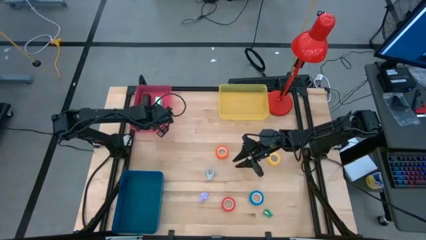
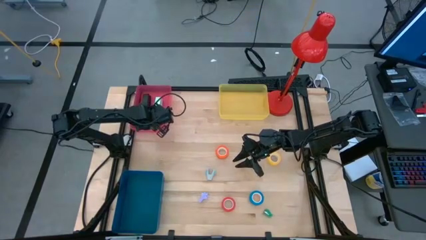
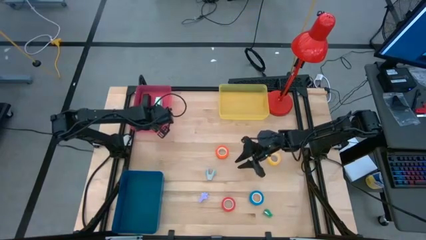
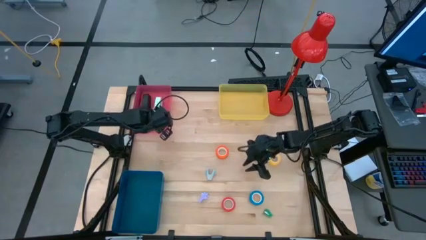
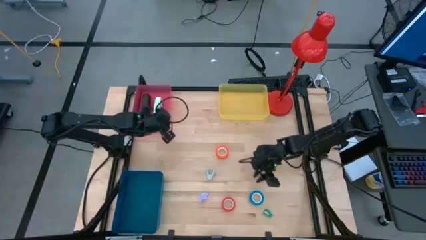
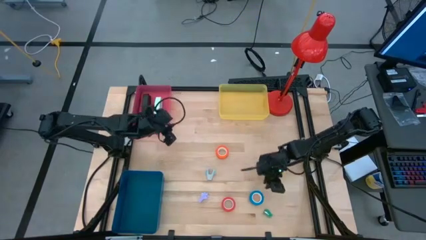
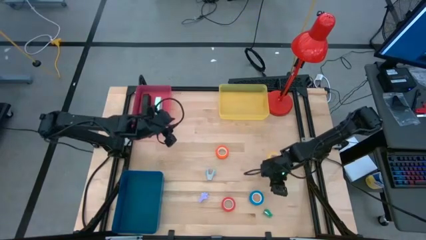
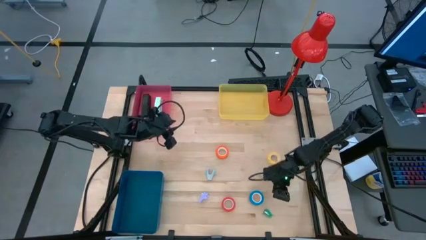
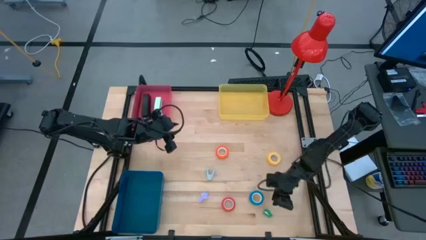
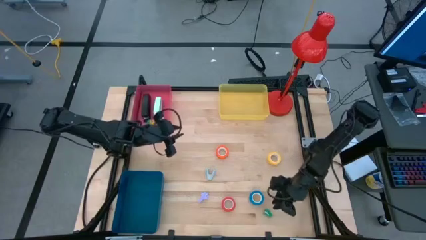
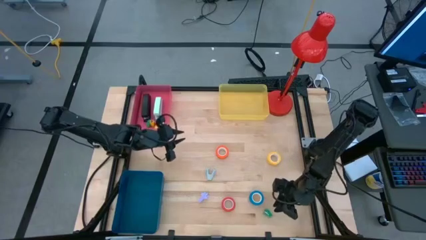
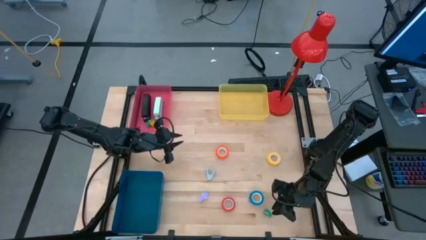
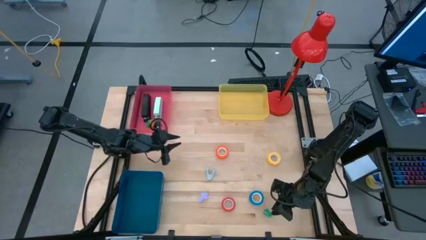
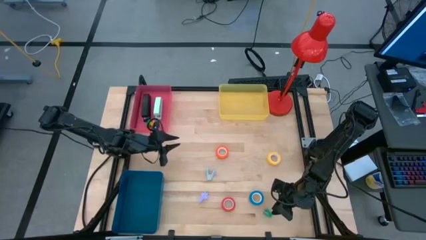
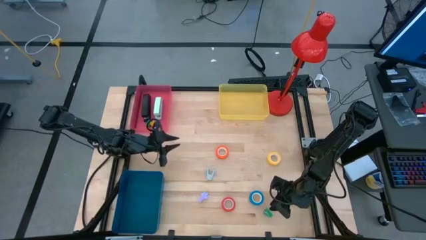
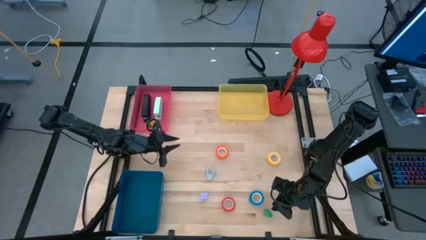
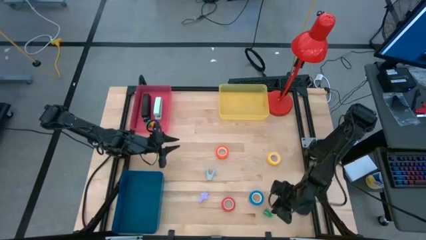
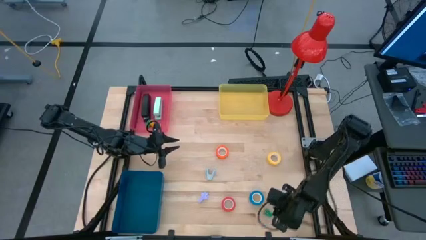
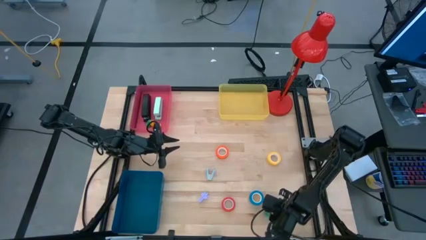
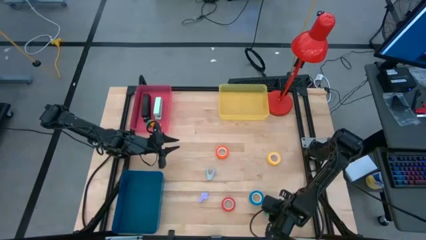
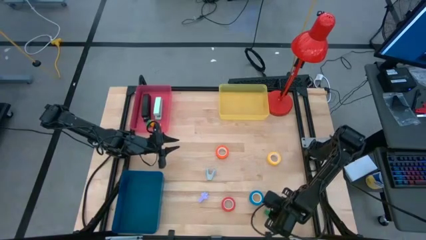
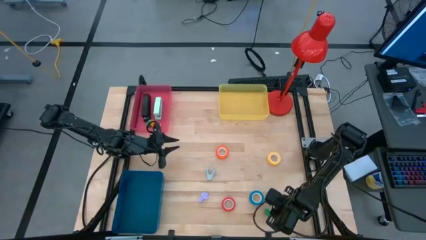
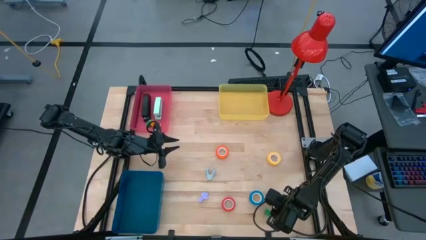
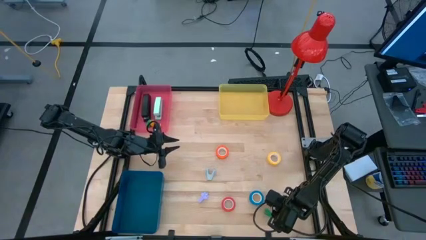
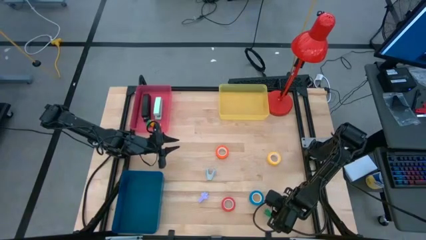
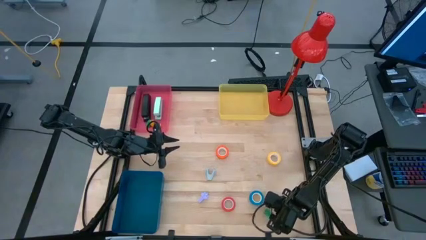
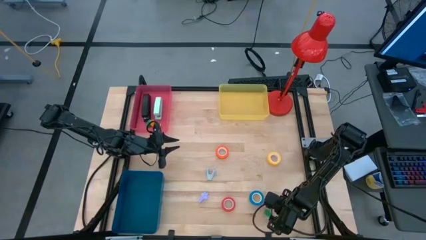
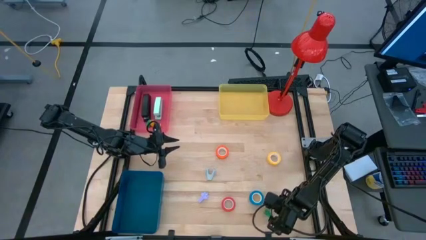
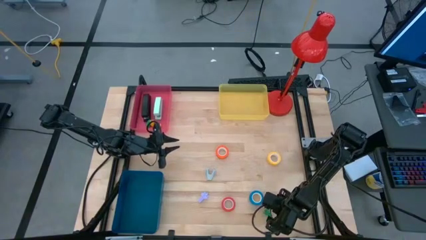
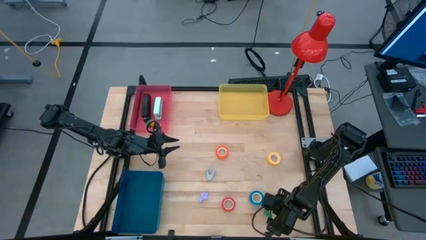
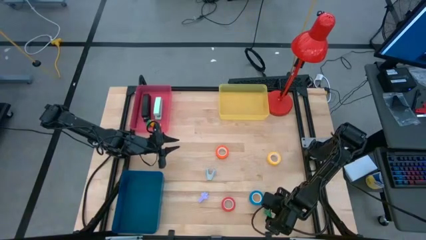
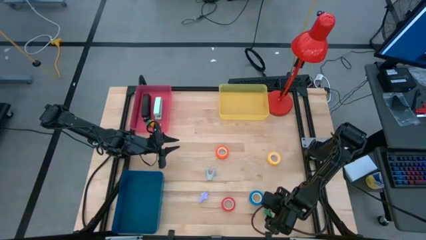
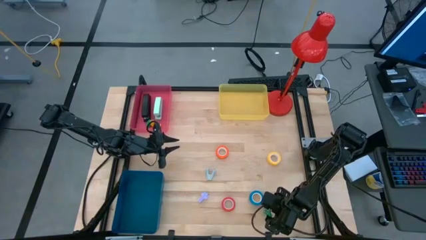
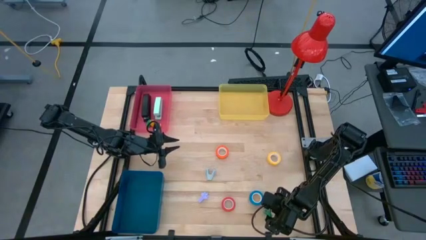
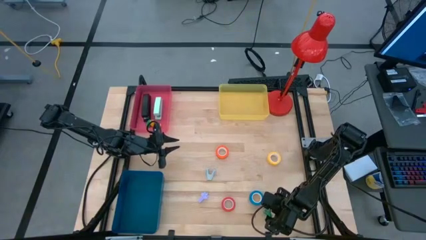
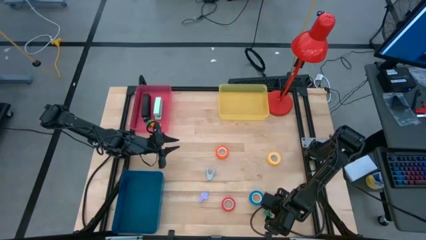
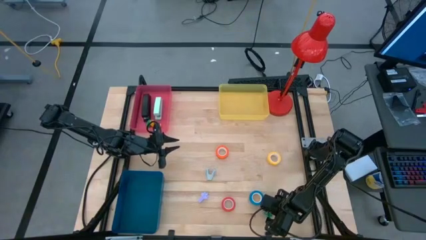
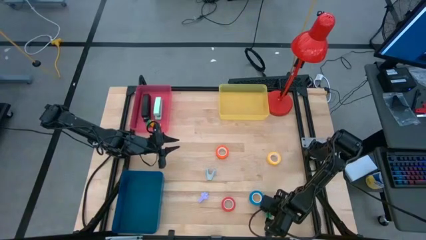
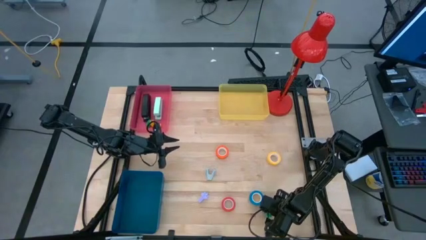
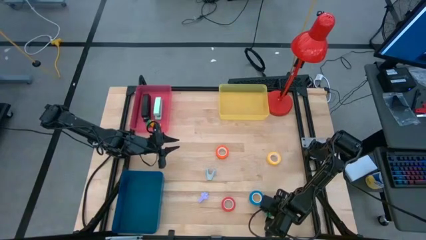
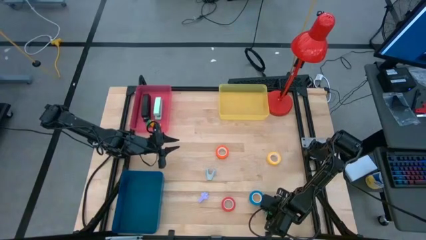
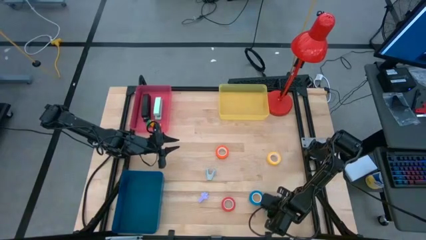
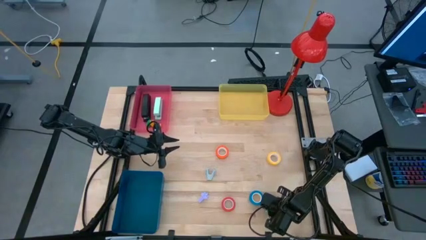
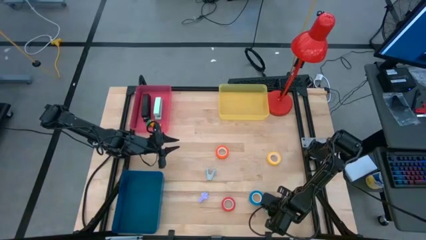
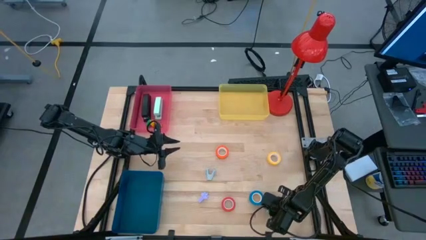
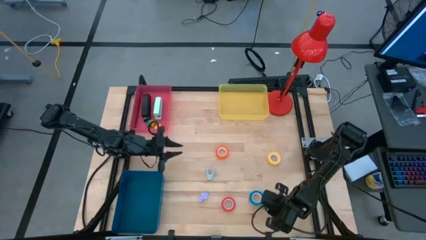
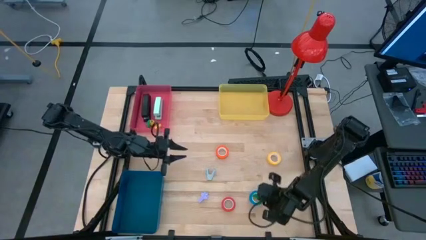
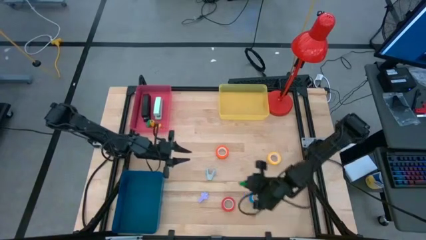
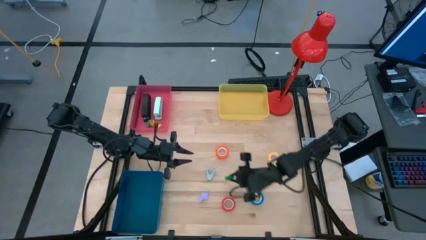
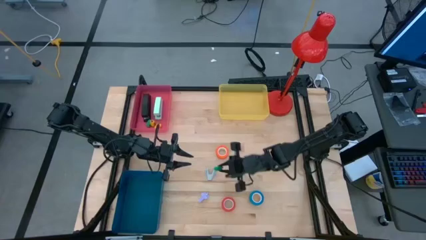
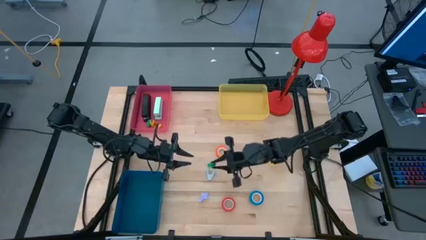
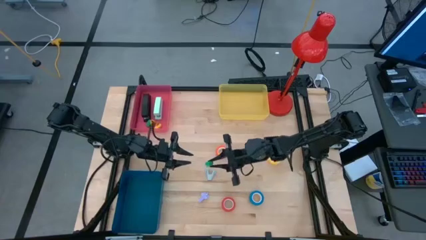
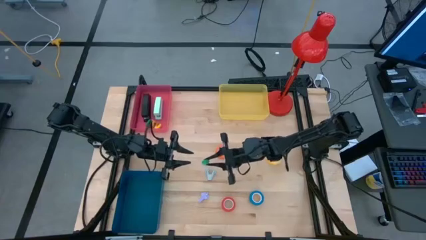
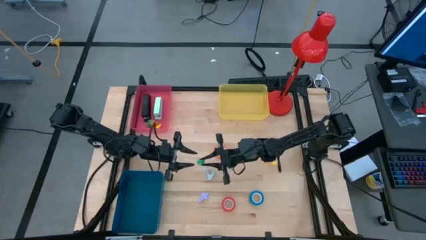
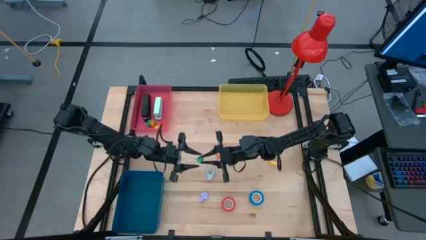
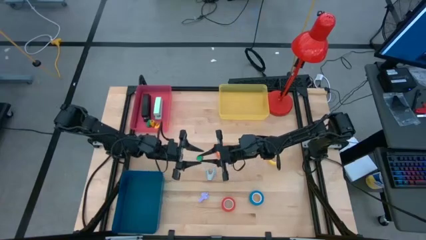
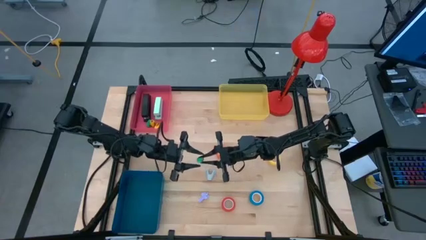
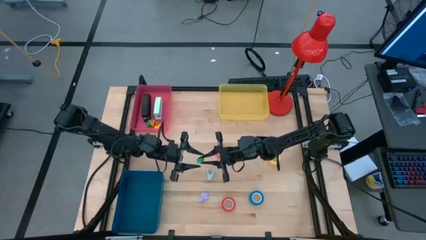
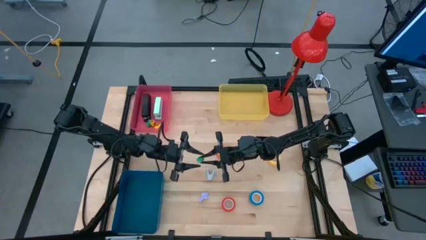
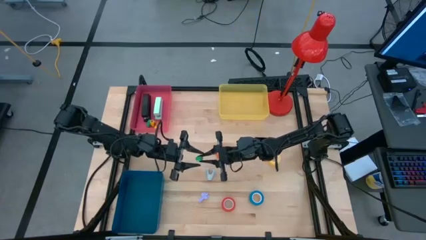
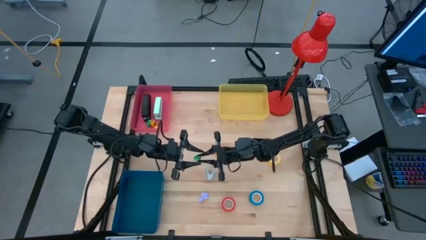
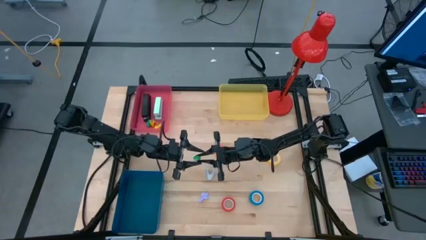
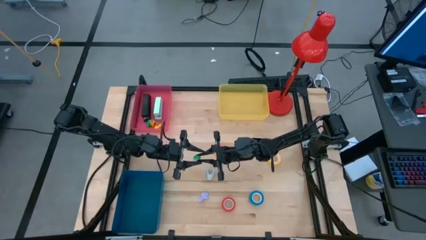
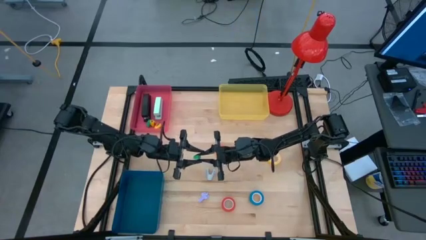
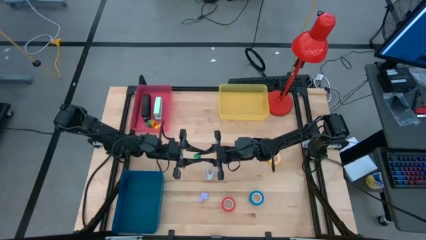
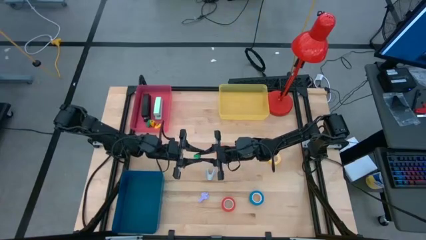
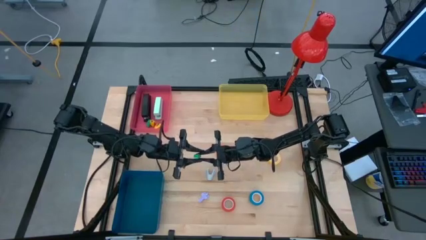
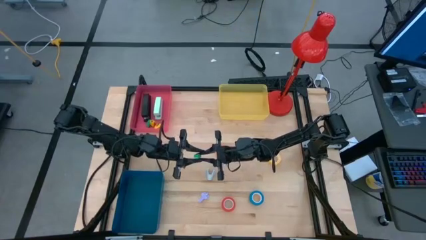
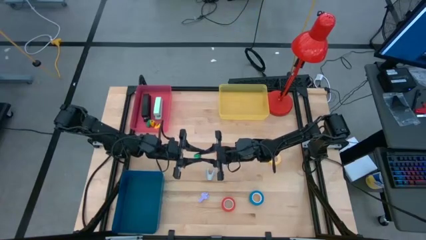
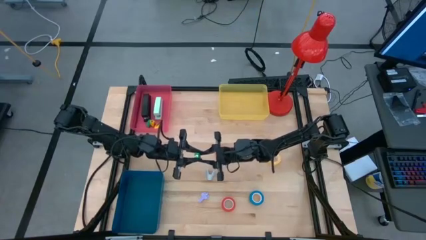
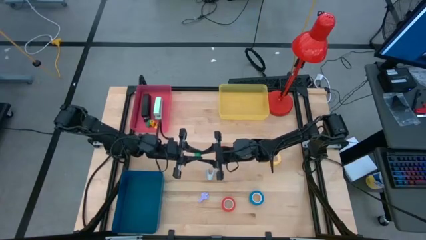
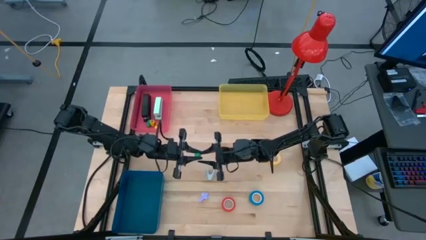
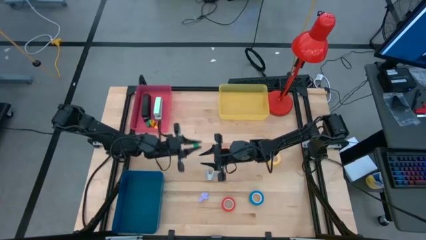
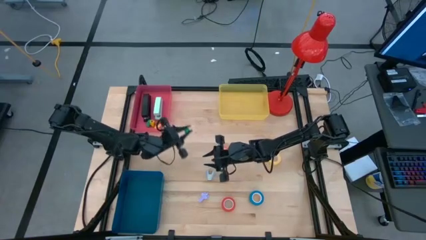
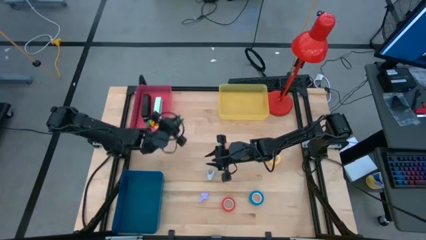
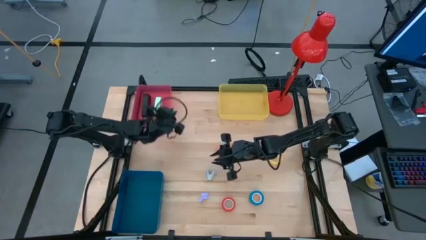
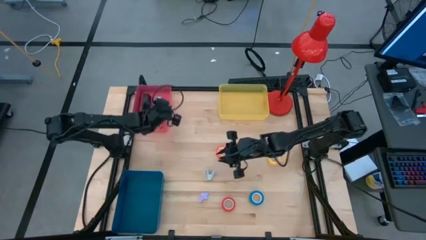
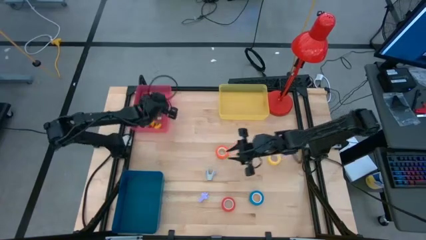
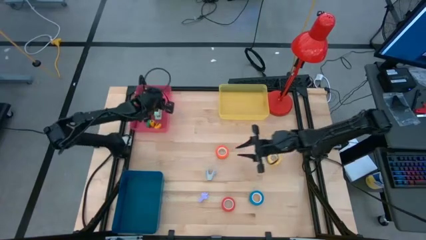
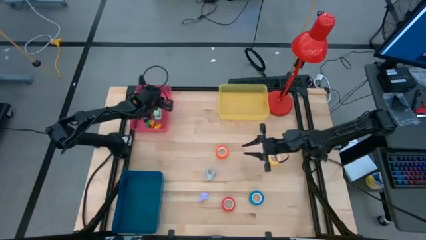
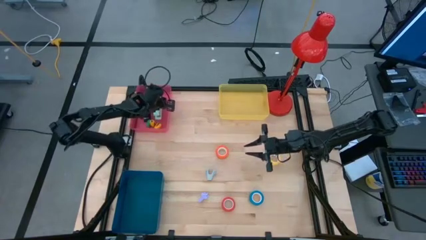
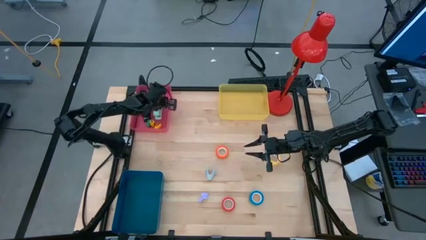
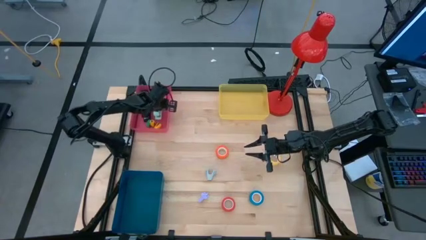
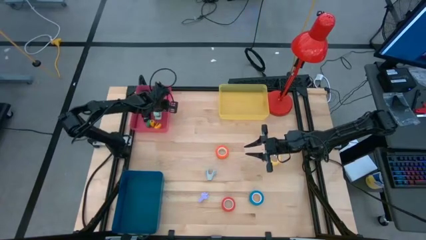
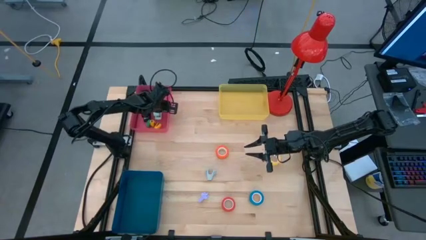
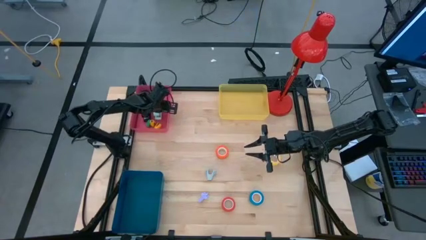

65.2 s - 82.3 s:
Task: Pick and place Stapler, Stapler remover, tape
Put the green stapler into the pink bin
